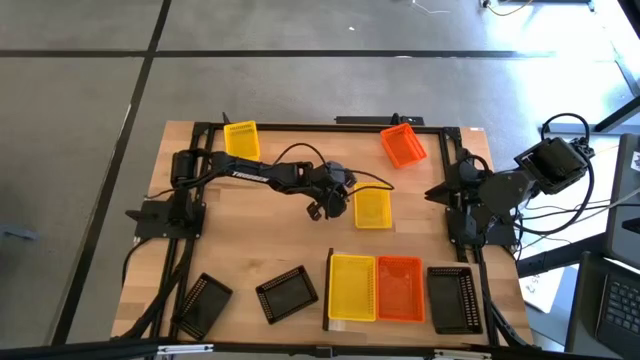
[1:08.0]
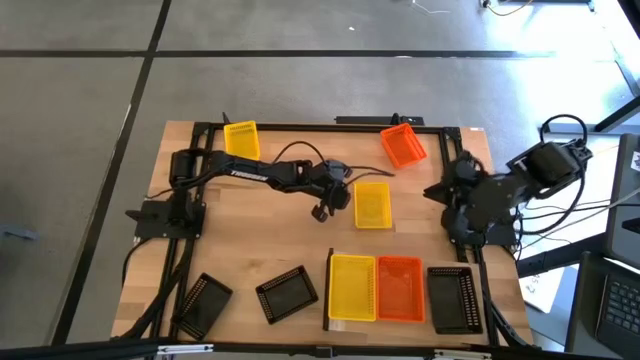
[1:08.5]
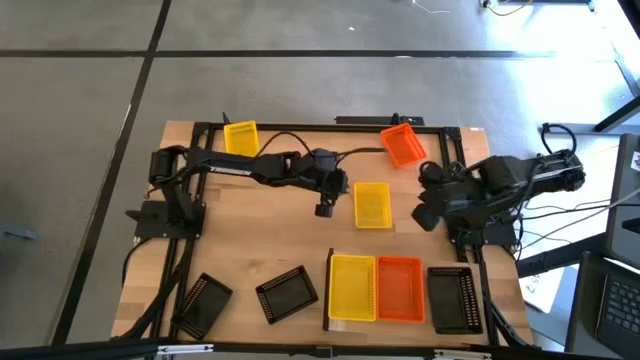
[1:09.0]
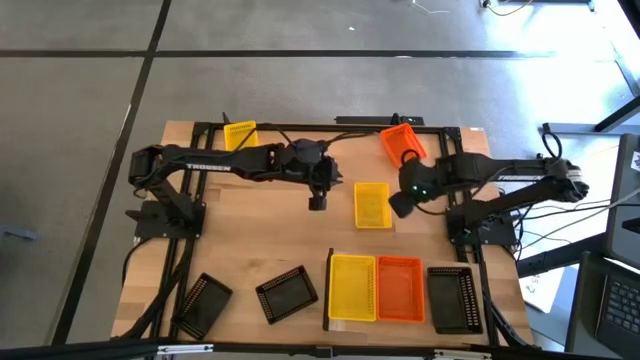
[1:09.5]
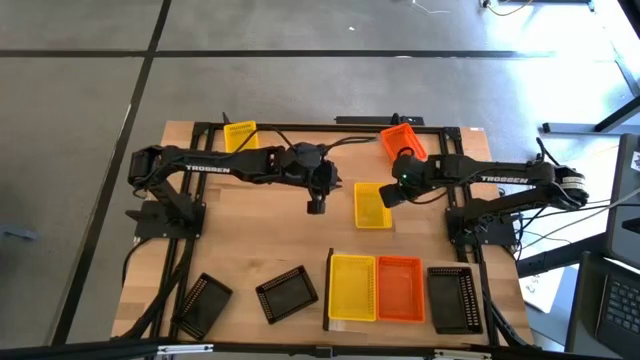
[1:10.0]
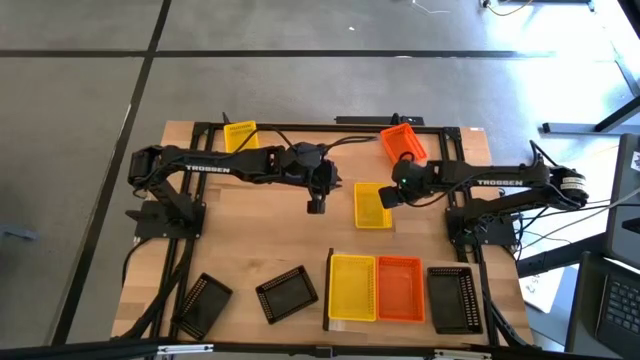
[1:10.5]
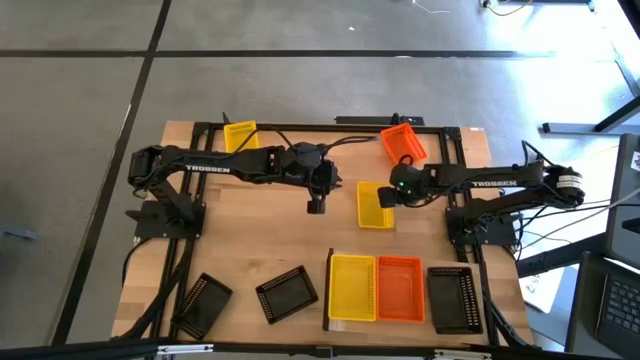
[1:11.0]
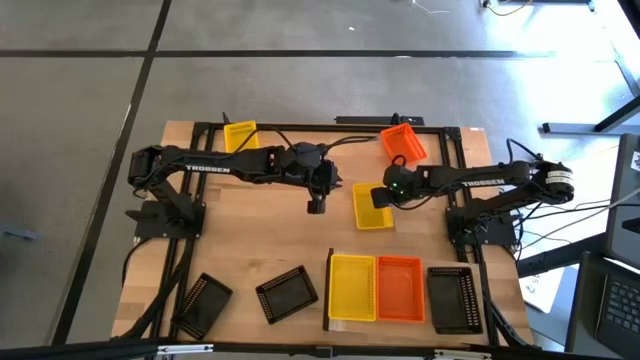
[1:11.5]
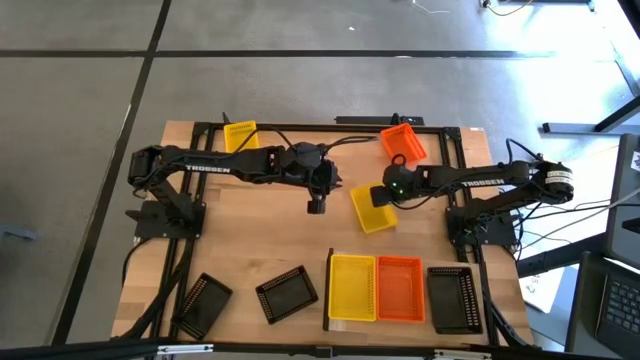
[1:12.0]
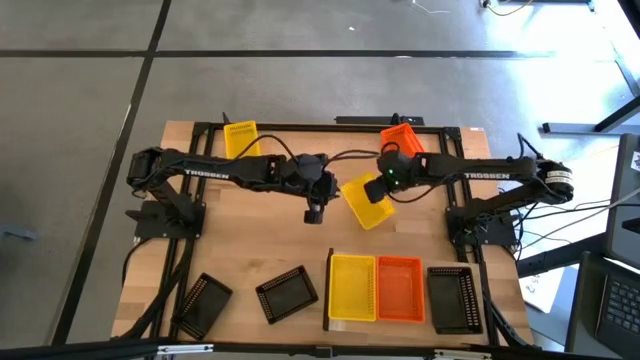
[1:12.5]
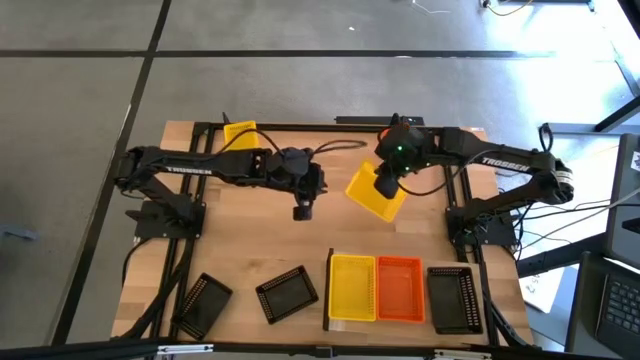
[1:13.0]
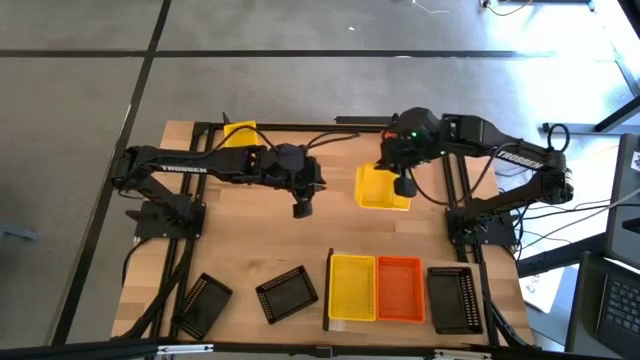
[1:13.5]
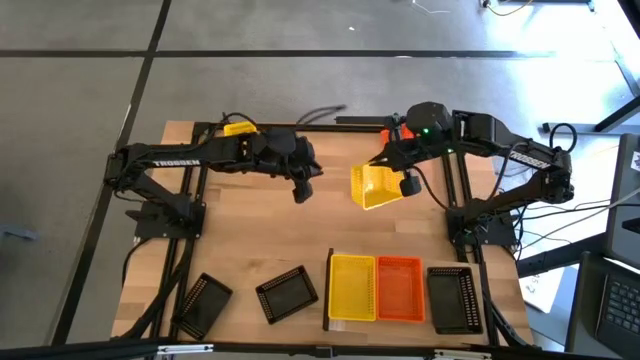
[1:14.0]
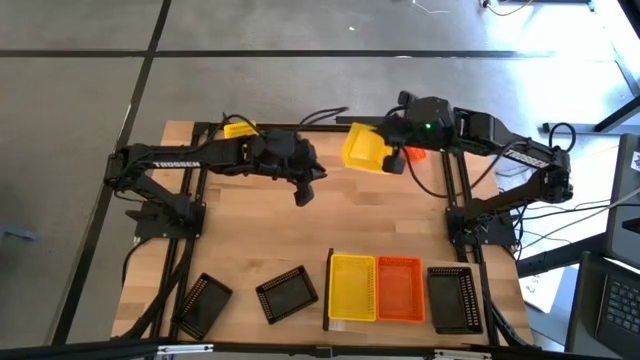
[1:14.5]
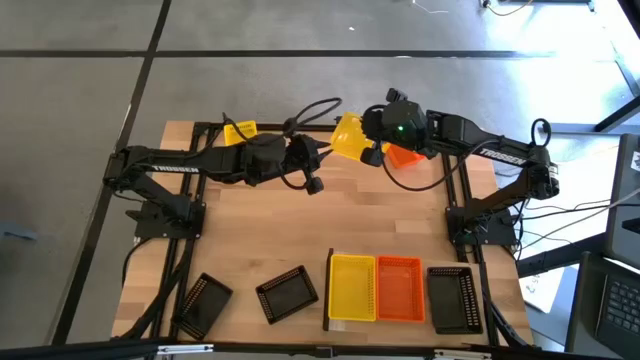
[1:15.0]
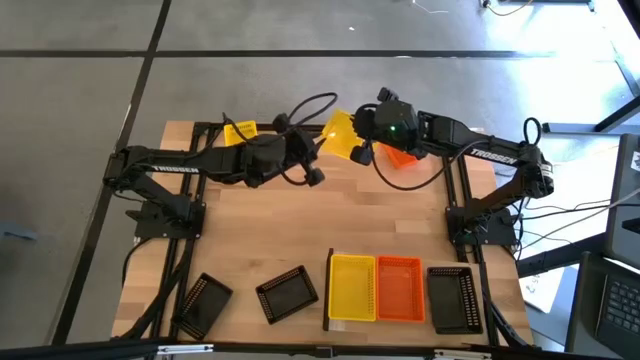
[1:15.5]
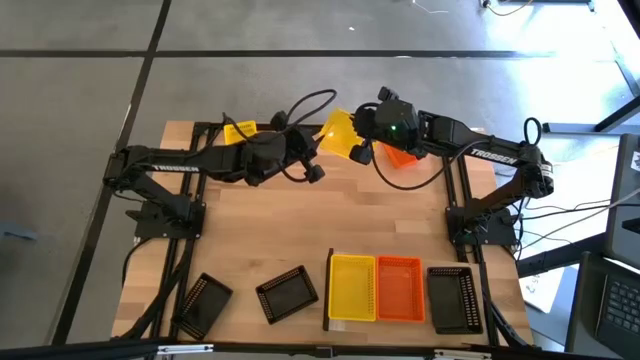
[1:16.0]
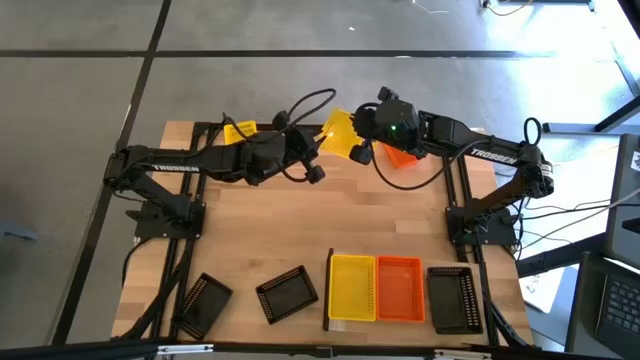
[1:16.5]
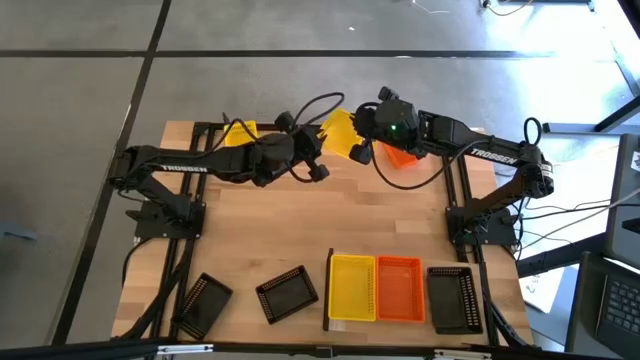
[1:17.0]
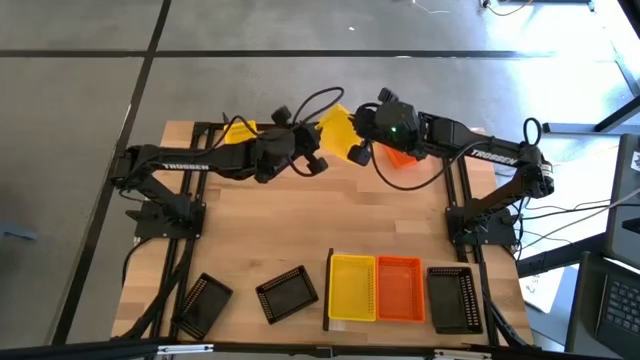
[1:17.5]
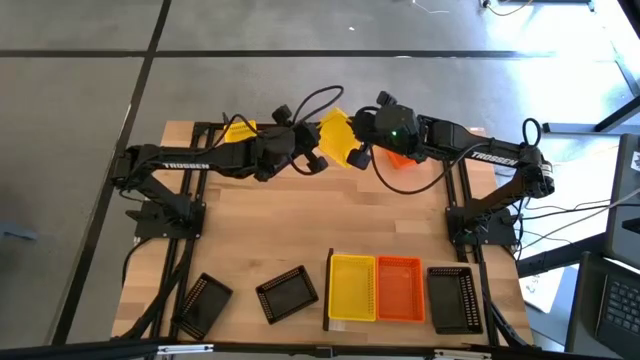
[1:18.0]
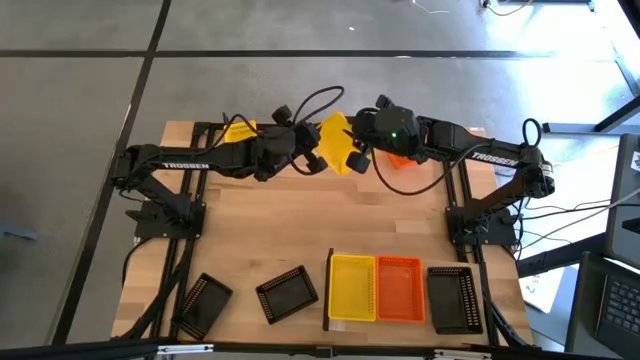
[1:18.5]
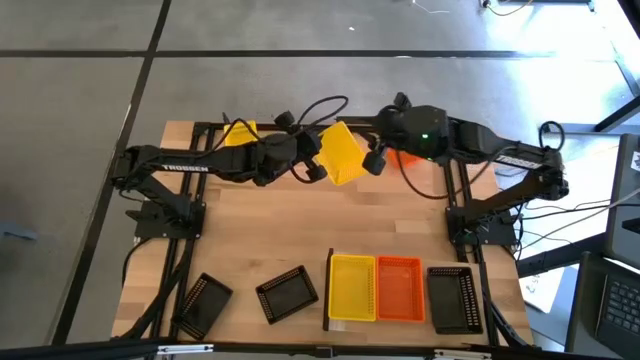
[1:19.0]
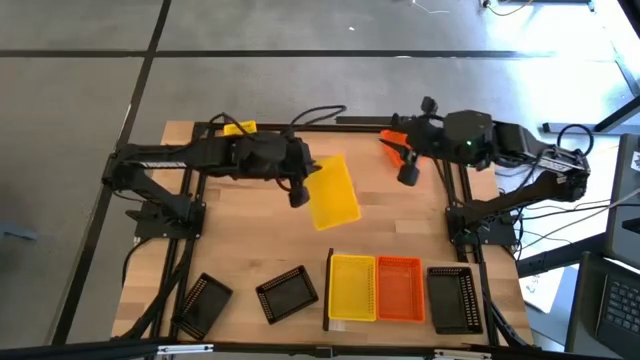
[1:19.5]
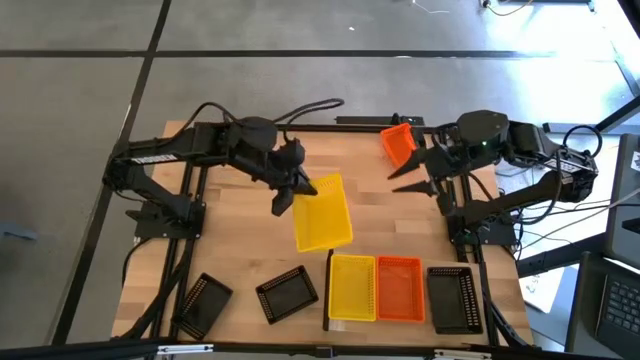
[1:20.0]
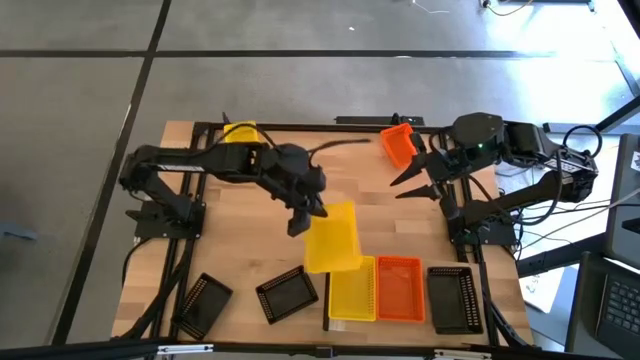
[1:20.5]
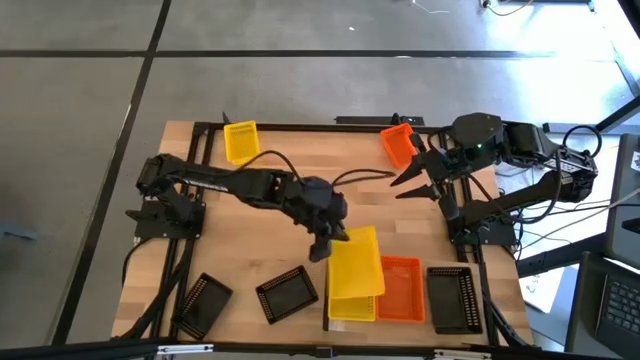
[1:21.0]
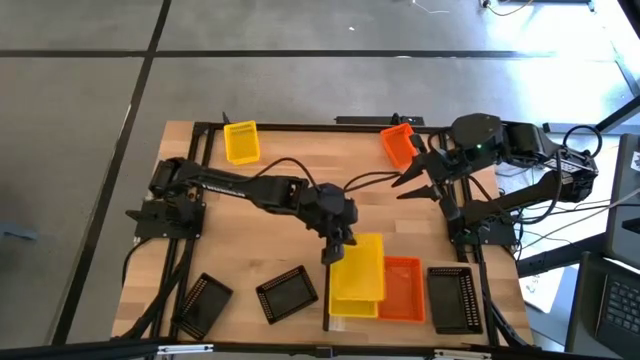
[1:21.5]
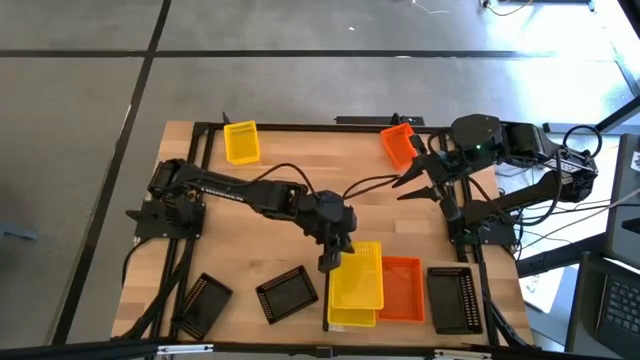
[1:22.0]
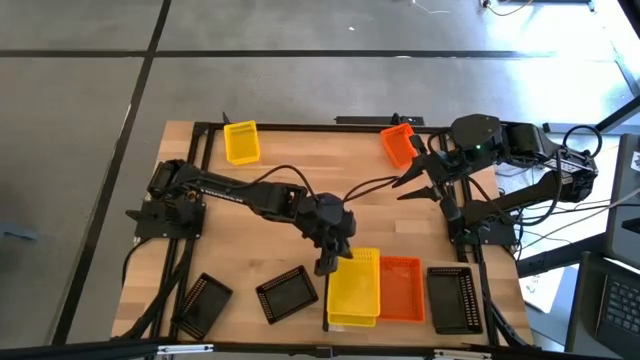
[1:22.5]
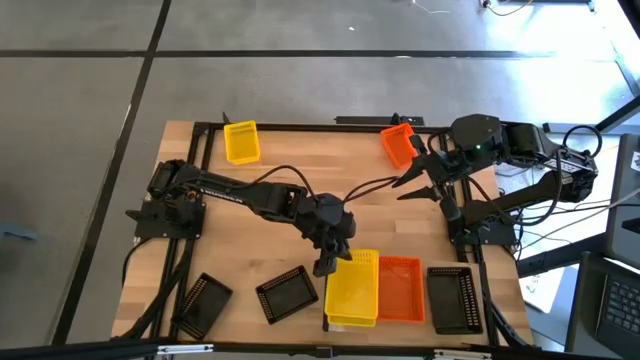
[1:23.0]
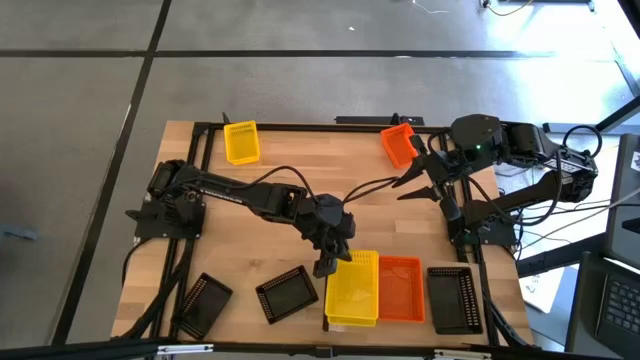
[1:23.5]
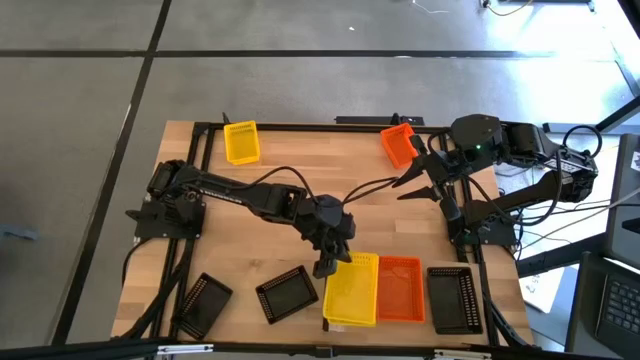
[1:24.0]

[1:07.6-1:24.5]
Task: Stack baskets on shelf by color
Stack the bottom yellow bin on top of the yellow bin

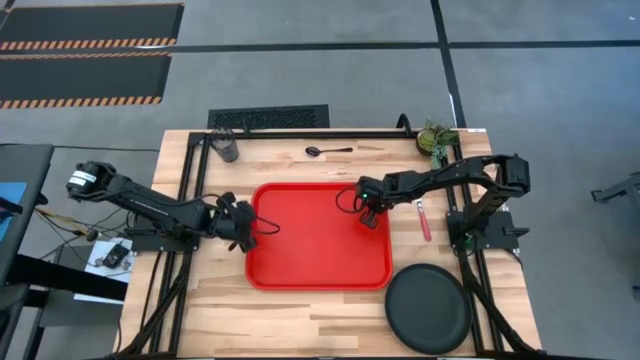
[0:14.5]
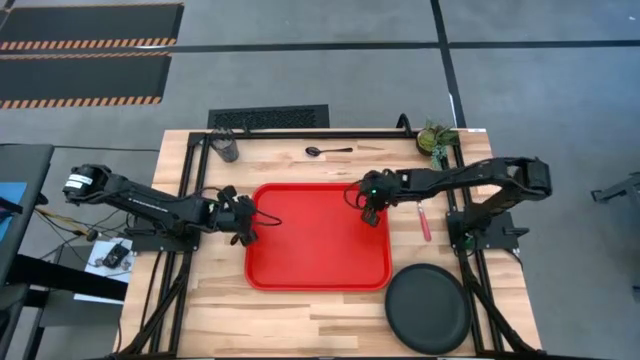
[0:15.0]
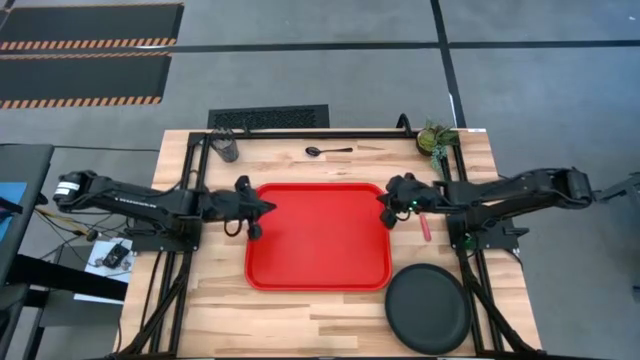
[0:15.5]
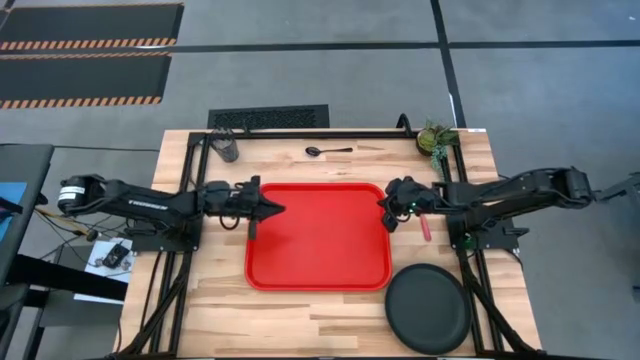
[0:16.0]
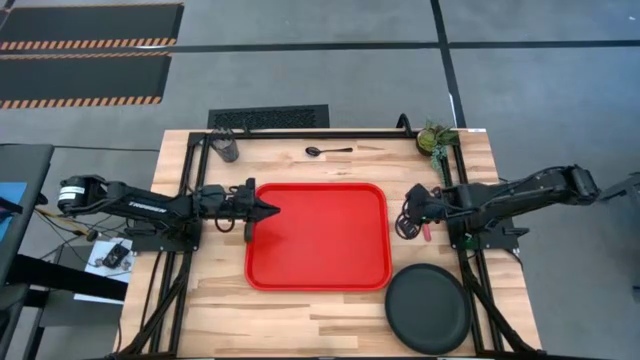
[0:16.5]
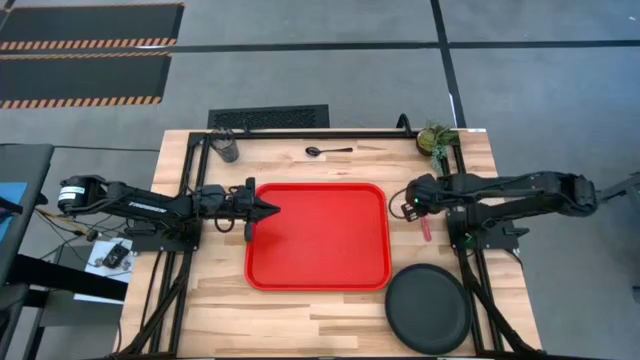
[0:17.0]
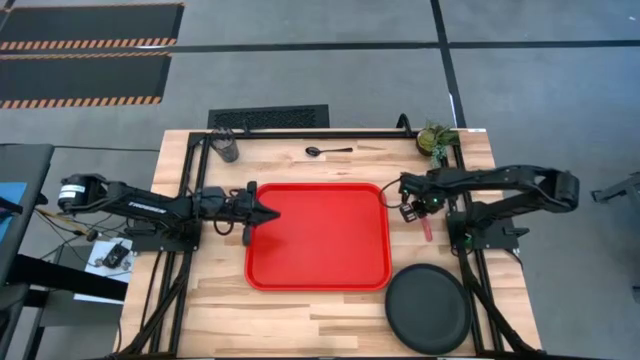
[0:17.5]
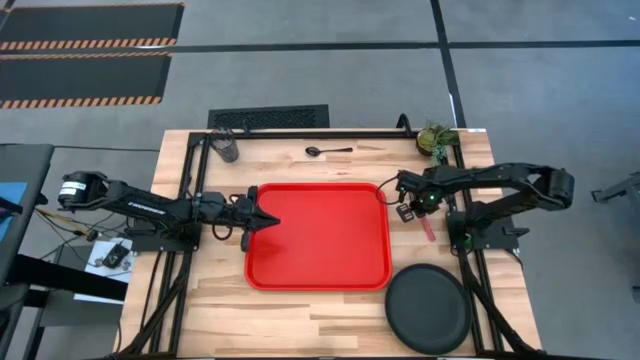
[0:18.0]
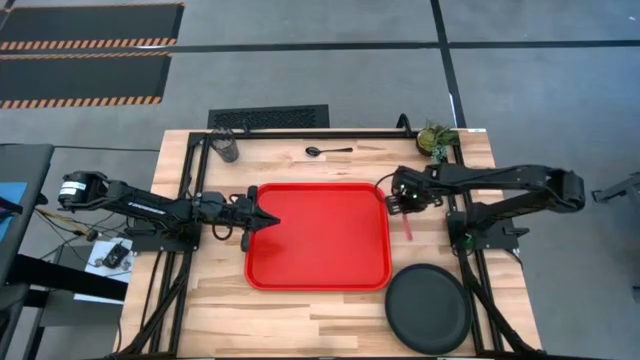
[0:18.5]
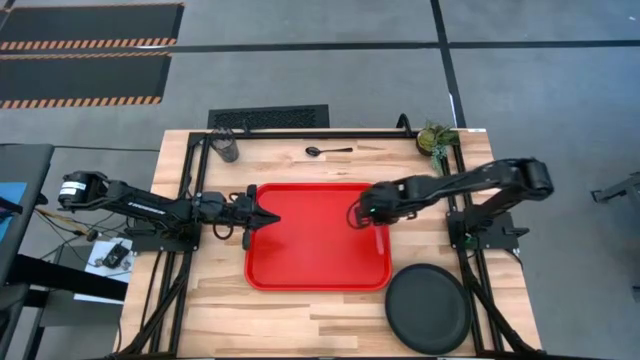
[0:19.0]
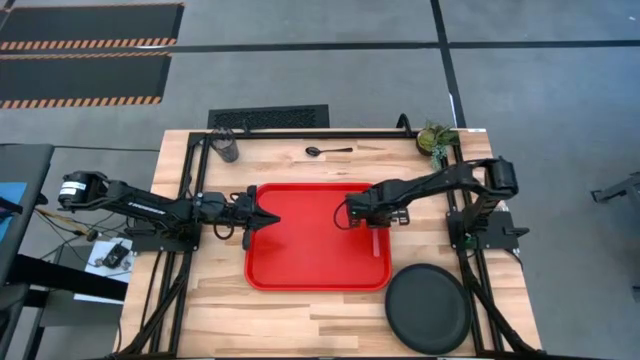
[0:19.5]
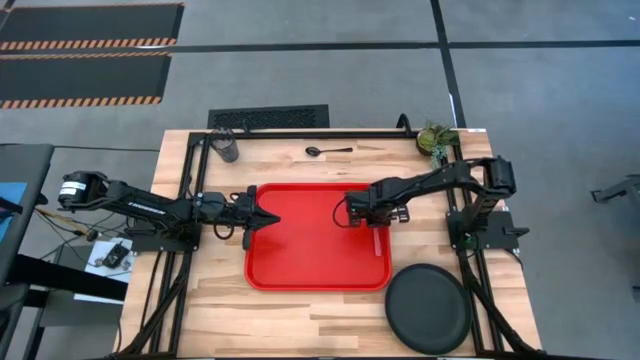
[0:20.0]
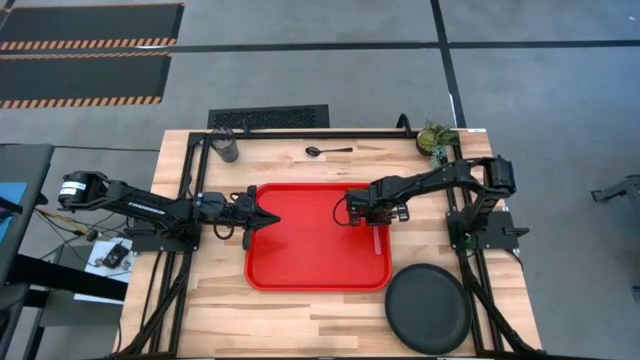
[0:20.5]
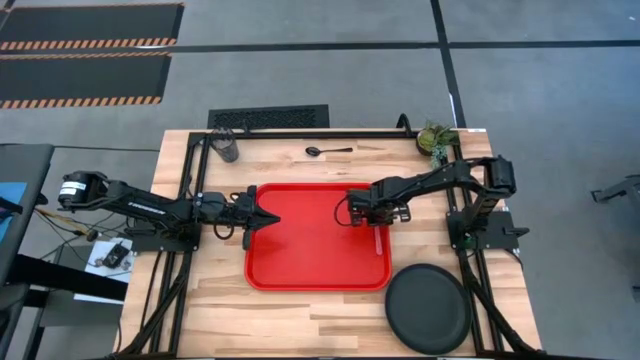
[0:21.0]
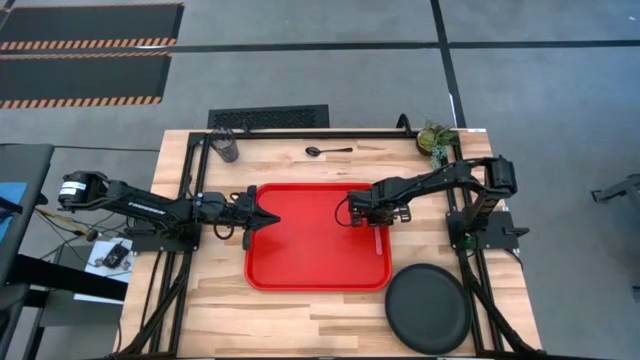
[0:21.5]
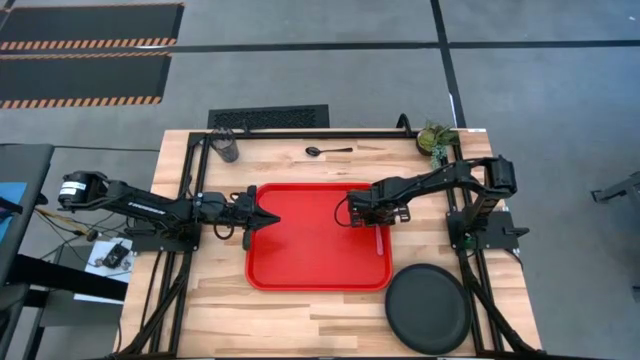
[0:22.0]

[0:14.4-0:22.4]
Task: Pick and place plate/cup/fork/spoon on tray
Put the red fork on the red tray
